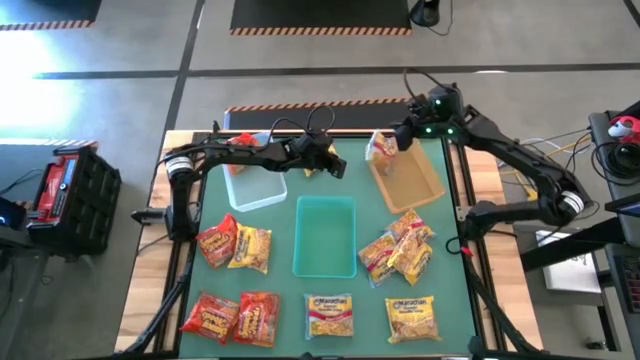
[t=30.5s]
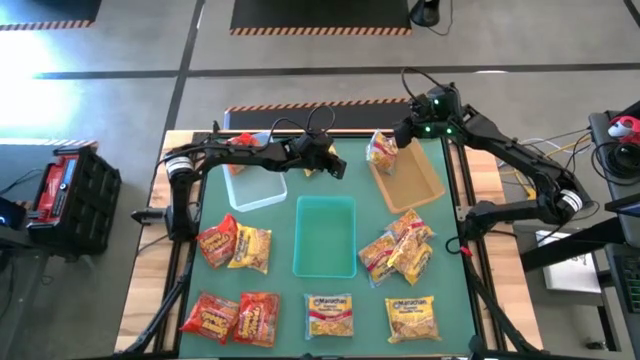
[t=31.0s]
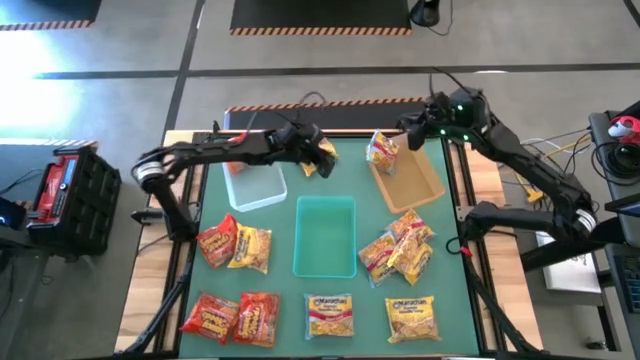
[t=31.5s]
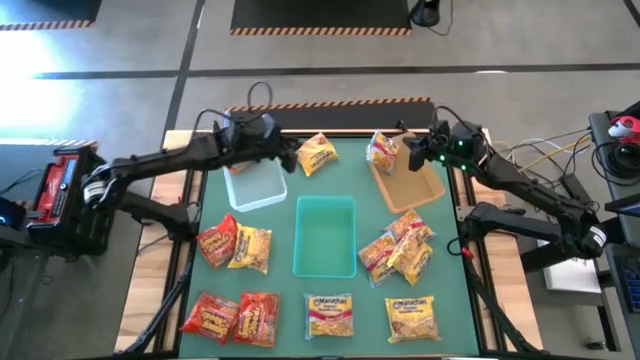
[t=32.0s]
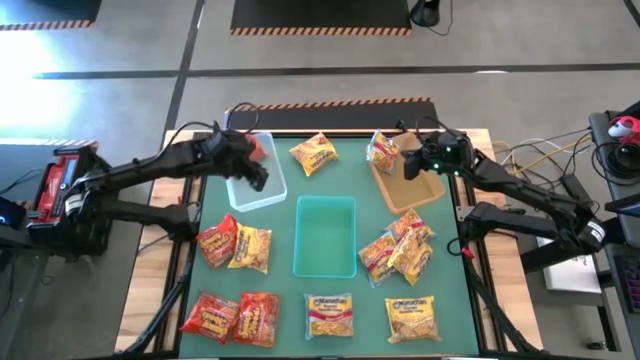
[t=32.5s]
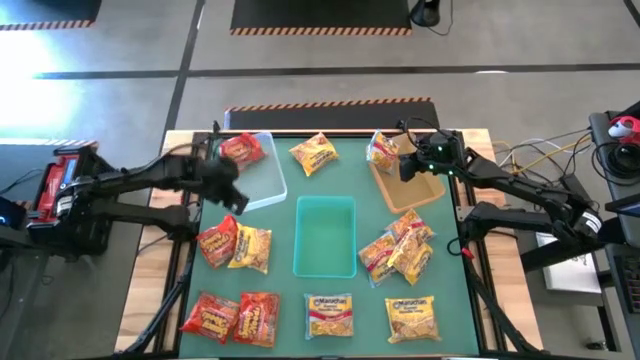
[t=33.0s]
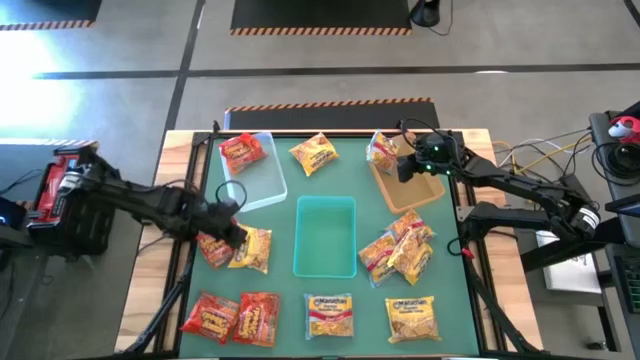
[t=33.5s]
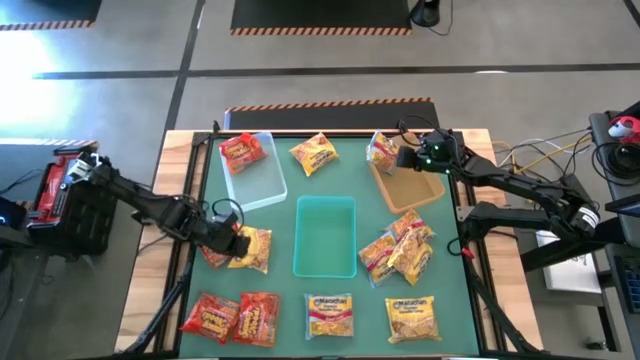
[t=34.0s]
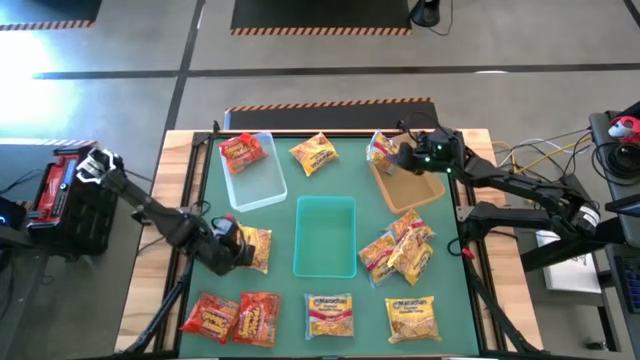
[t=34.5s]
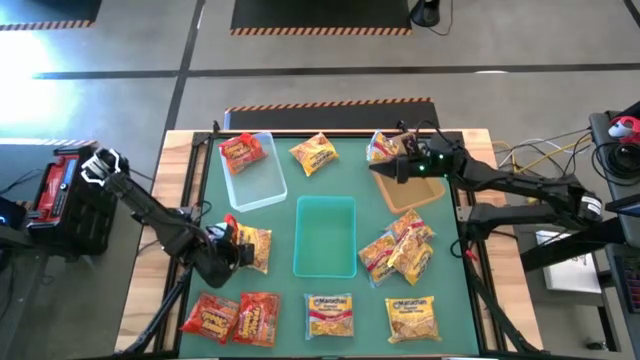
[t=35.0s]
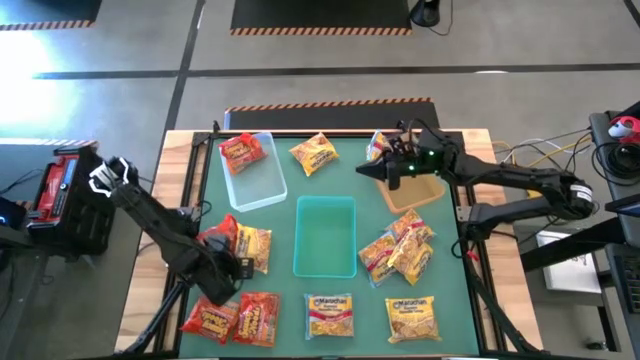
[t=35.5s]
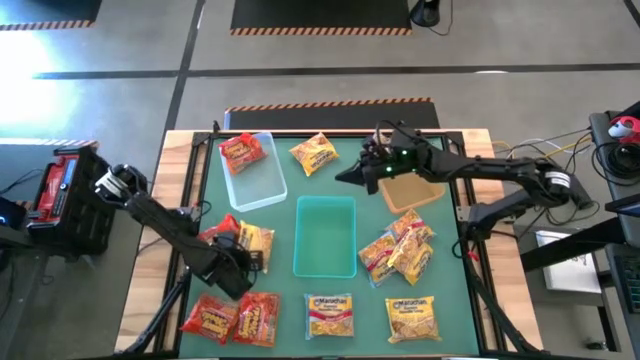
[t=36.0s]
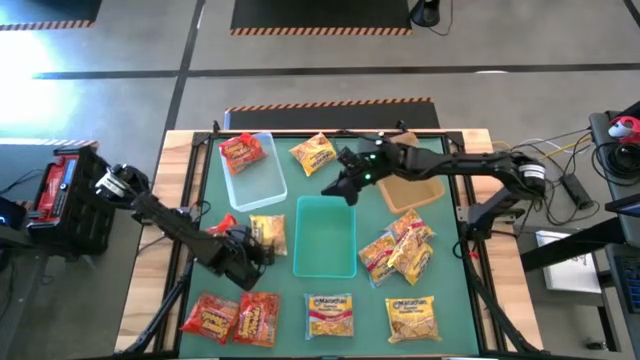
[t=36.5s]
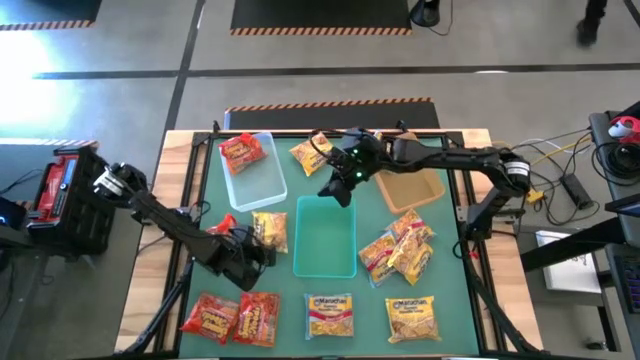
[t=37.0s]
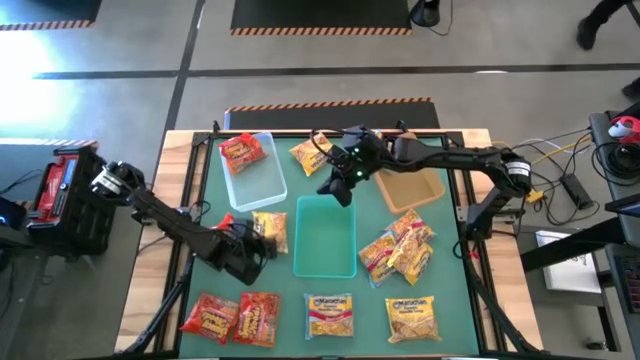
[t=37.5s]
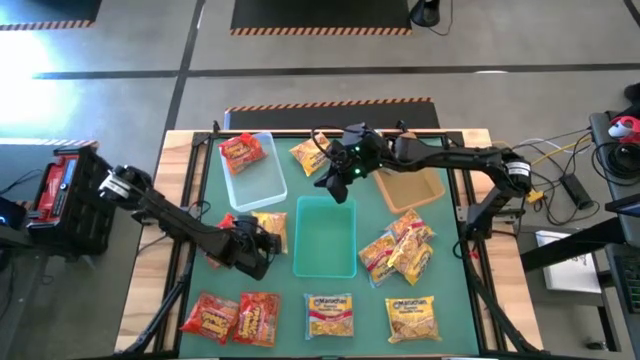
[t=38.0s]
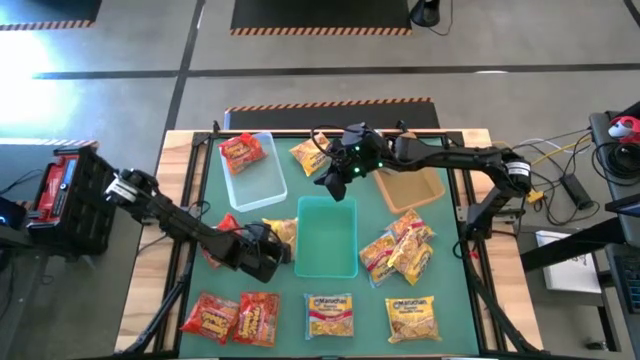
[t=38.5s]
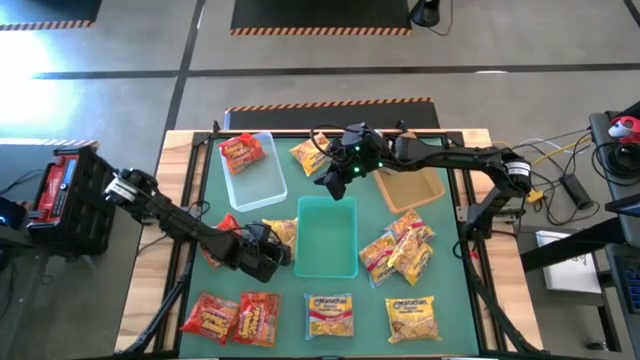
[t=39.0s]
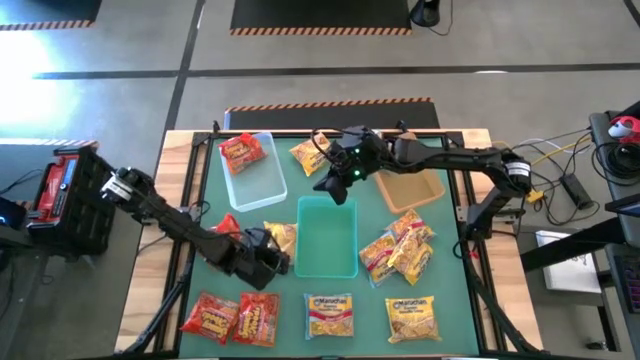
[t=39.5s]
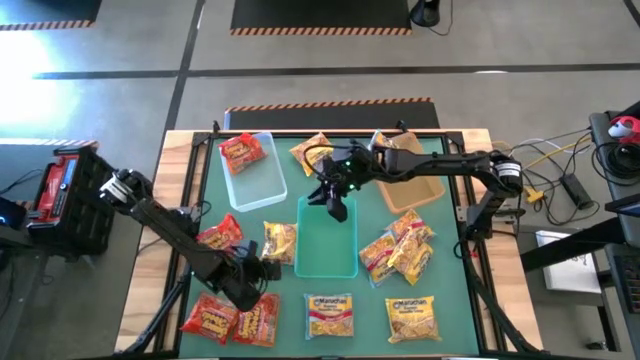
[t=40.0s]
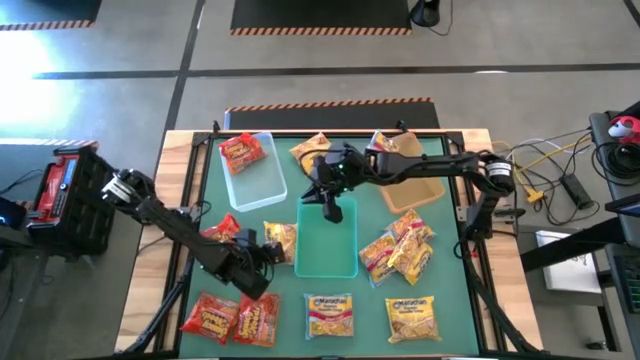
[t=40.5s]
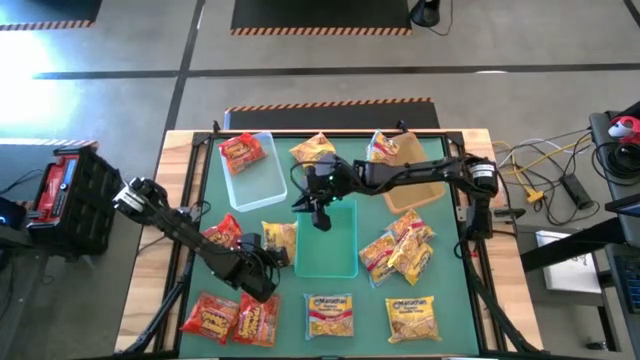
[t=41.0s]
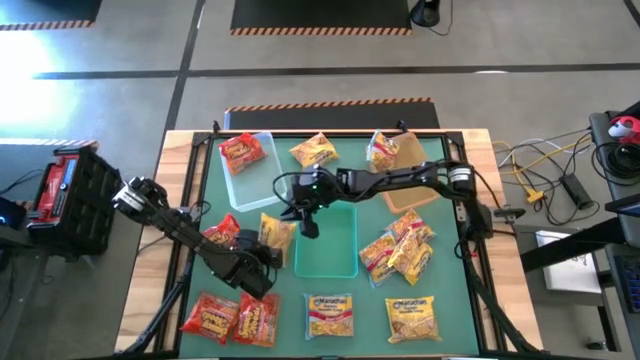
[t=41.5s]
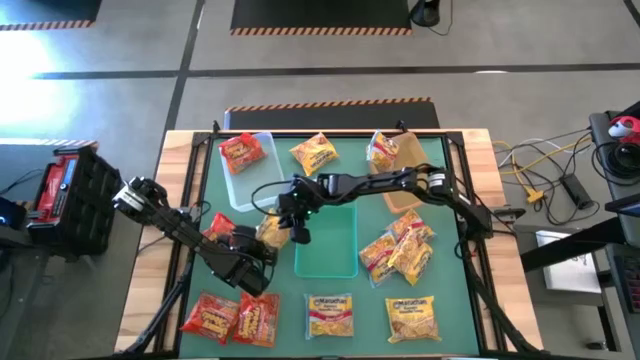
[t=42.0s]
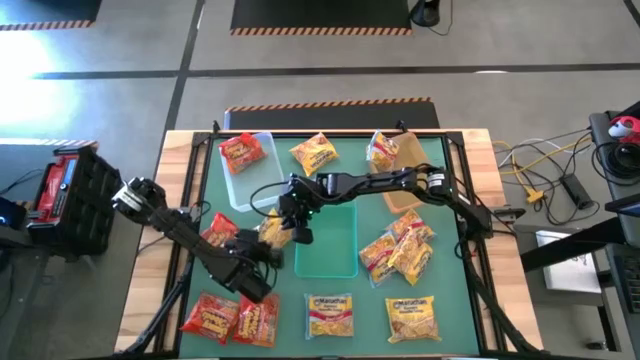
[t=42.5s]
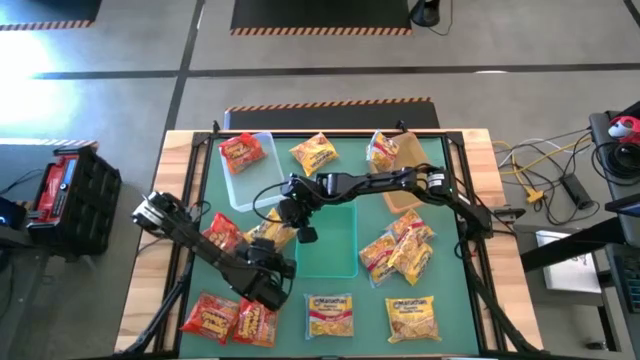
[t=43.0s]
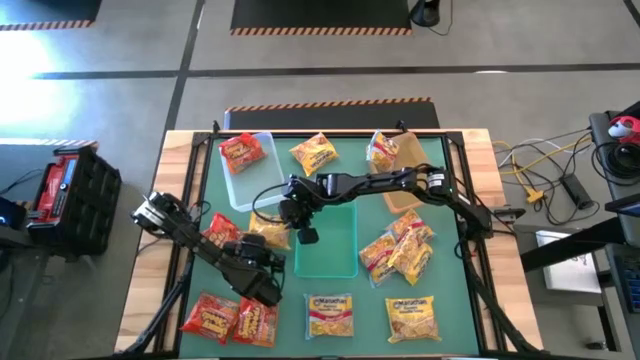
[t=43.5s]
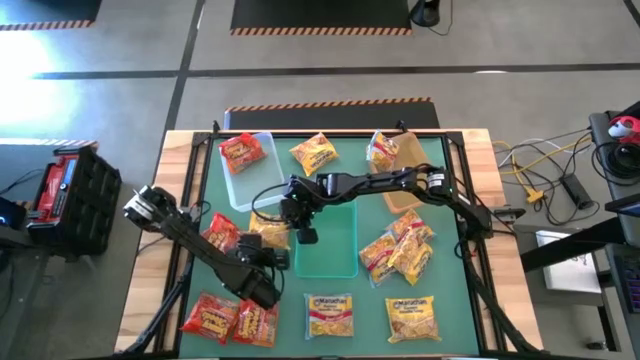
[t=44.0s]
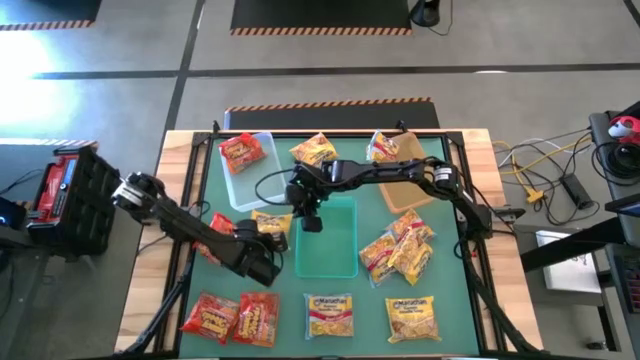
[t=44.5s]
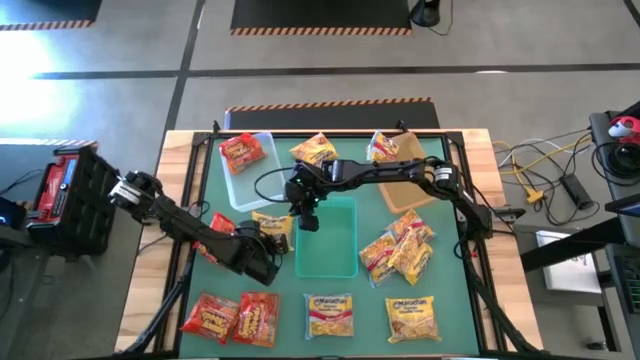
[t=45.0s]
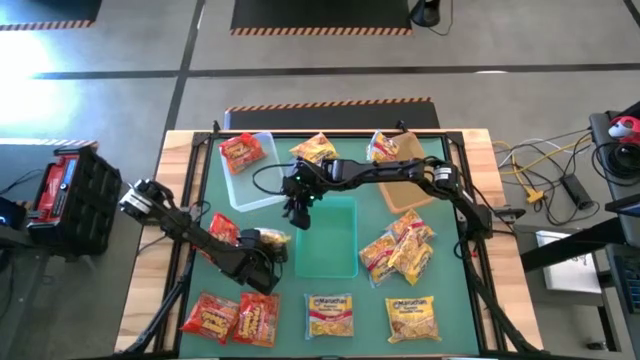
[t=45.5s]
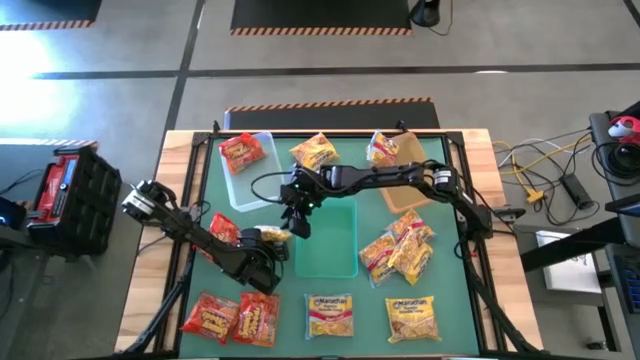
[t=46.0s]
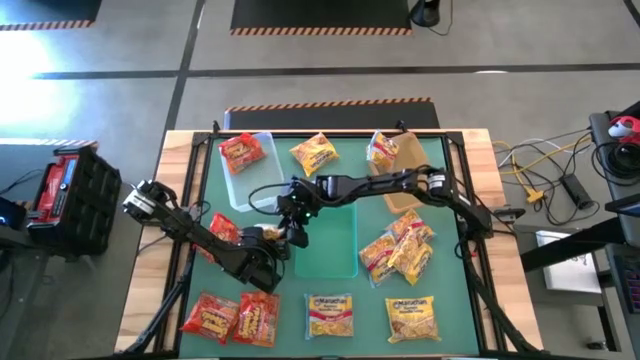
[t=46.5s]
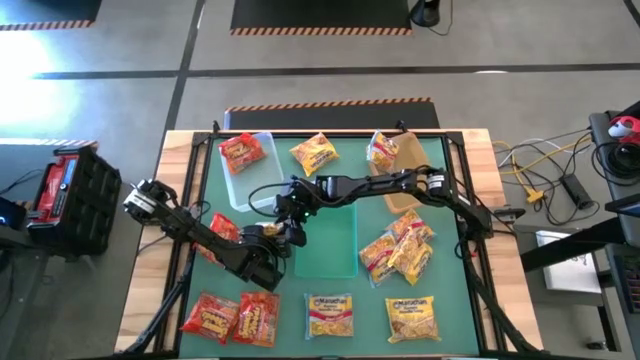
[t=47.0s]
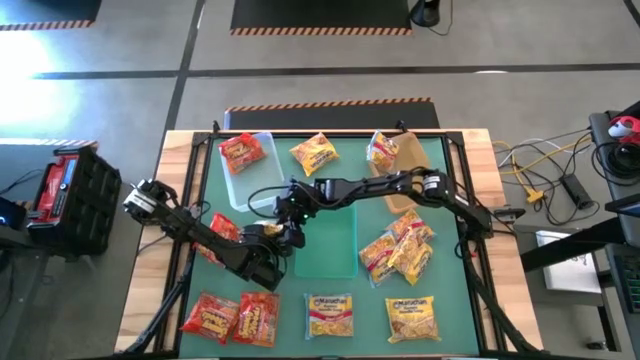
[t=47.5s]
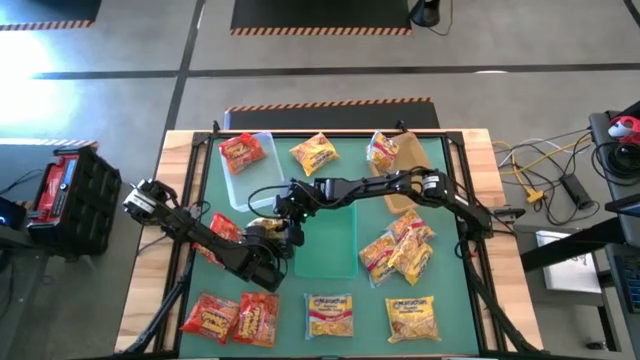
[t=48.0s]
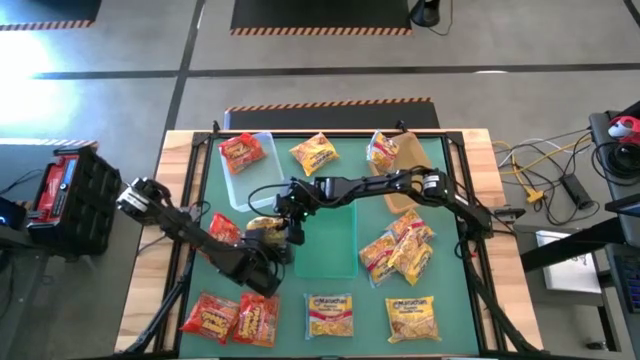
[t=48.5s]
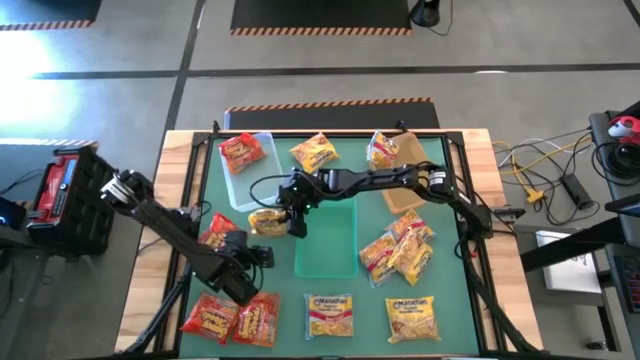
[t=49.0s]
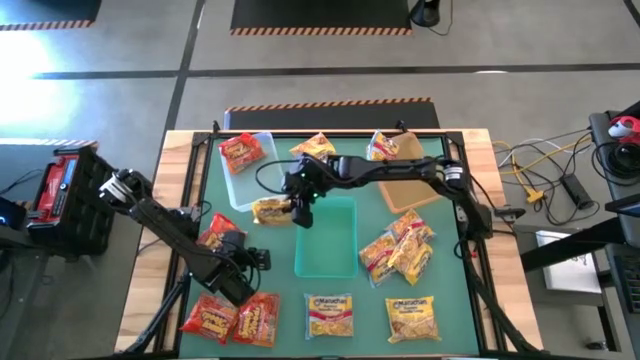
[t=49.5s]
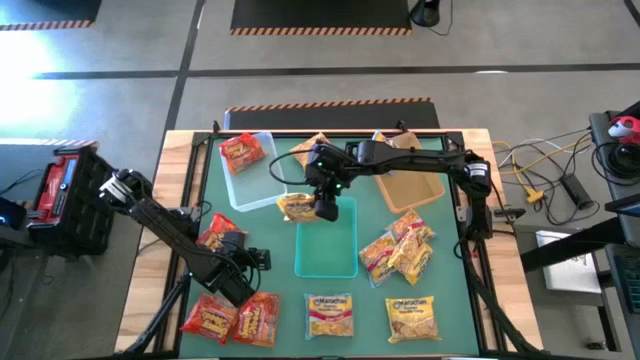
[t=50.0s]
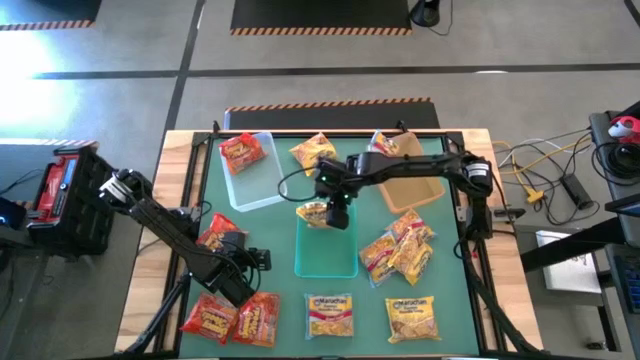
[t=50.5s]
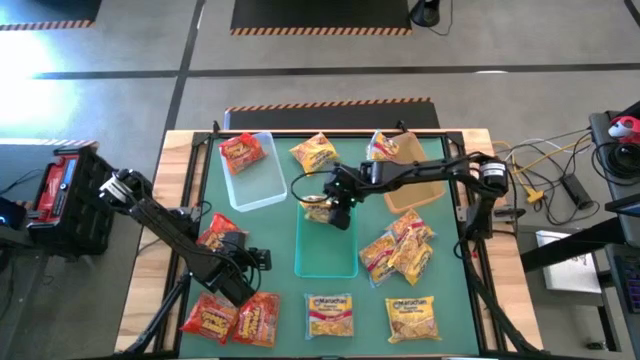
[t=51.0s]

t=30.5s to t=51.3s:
Task: Sort Maruchan noodles
Put the yellow noodle pack into the blue bin
